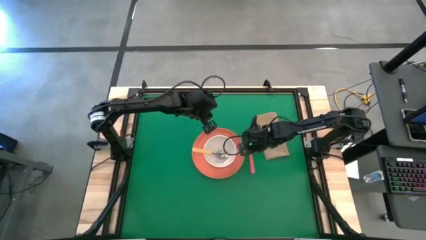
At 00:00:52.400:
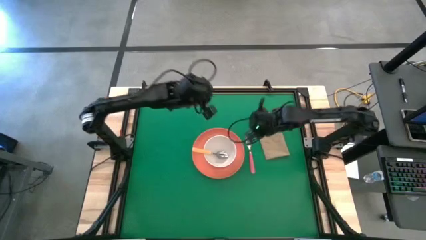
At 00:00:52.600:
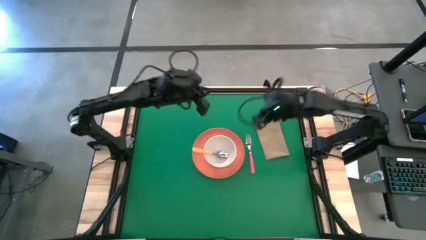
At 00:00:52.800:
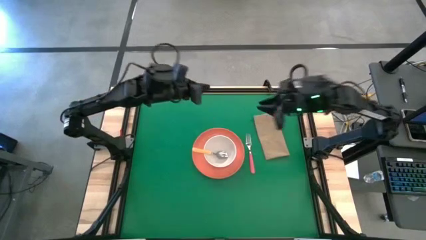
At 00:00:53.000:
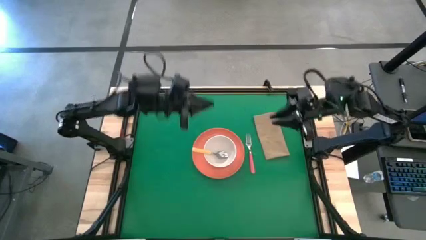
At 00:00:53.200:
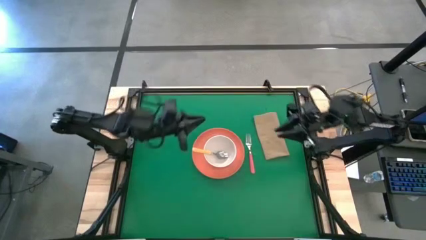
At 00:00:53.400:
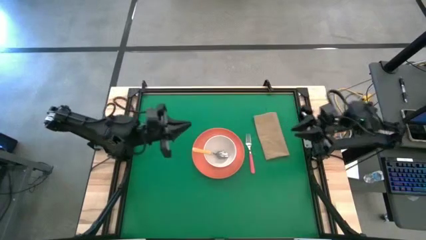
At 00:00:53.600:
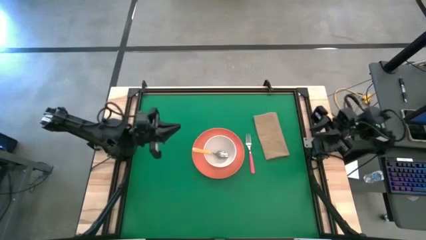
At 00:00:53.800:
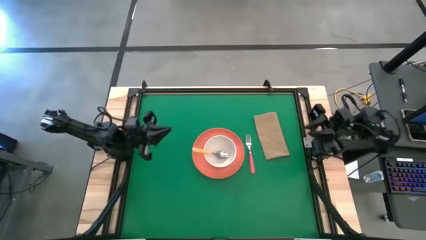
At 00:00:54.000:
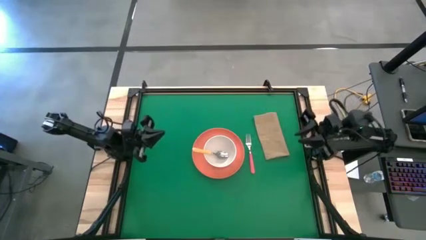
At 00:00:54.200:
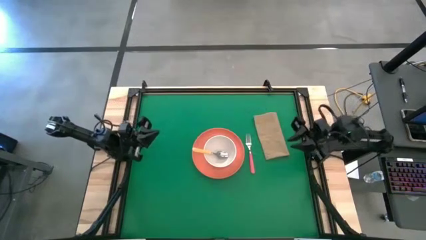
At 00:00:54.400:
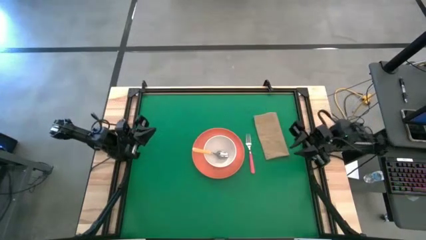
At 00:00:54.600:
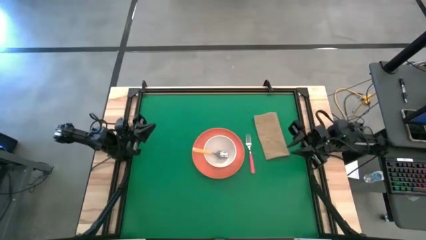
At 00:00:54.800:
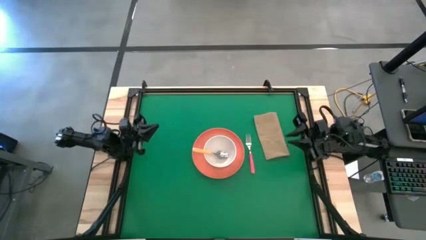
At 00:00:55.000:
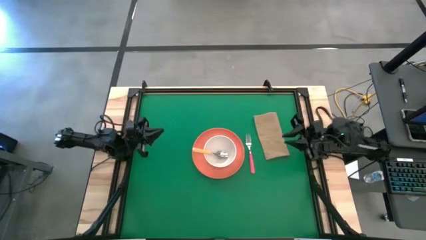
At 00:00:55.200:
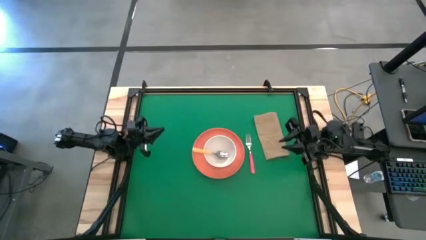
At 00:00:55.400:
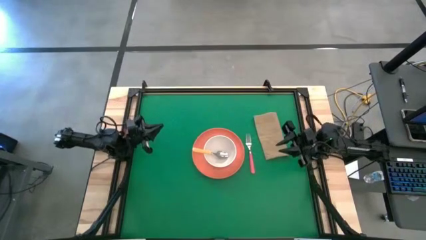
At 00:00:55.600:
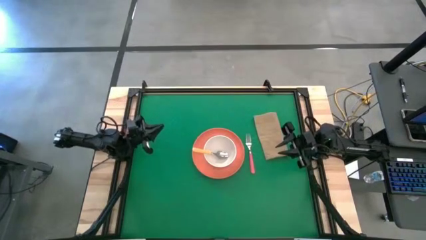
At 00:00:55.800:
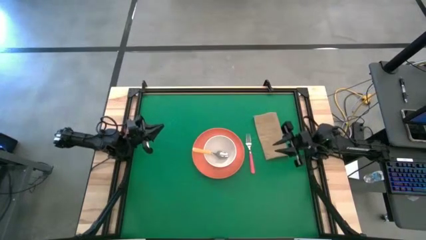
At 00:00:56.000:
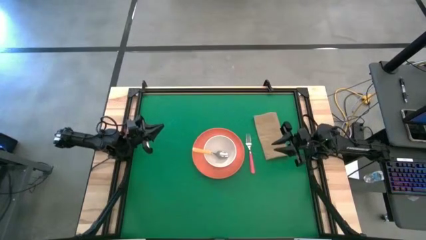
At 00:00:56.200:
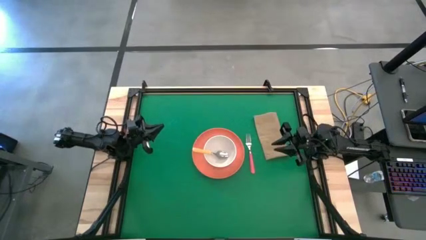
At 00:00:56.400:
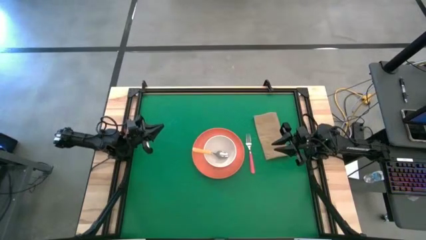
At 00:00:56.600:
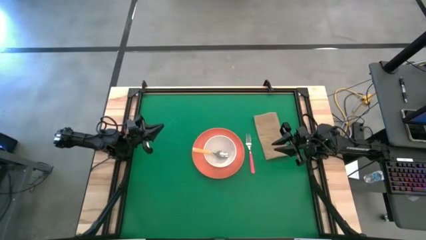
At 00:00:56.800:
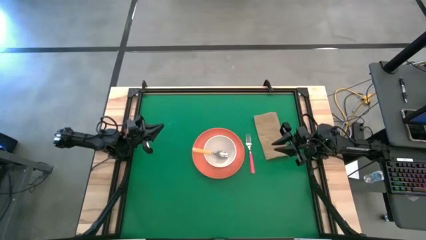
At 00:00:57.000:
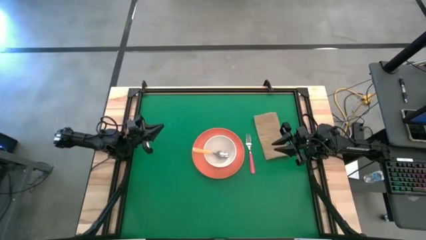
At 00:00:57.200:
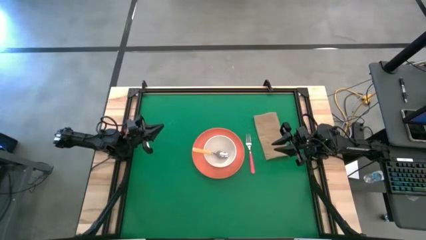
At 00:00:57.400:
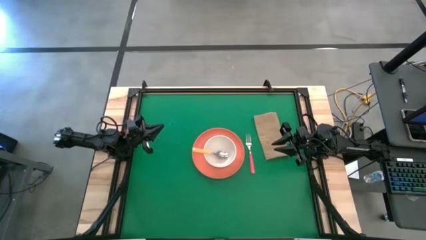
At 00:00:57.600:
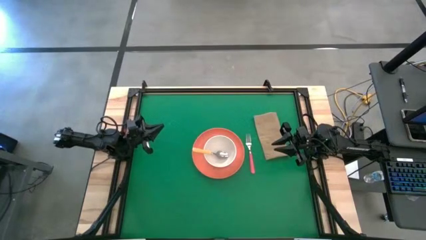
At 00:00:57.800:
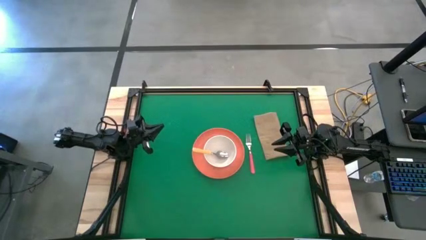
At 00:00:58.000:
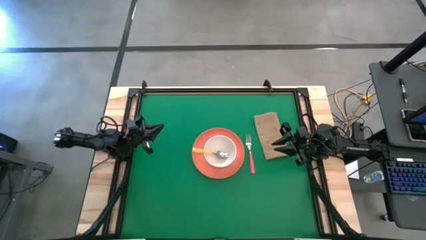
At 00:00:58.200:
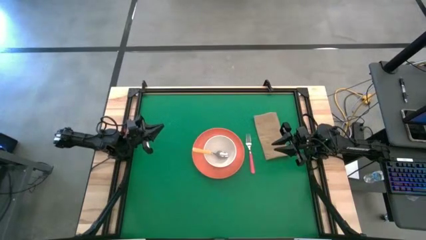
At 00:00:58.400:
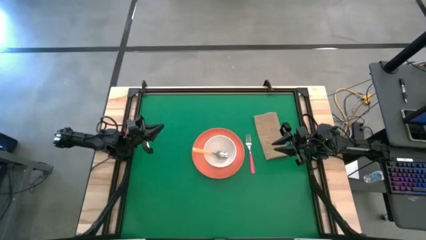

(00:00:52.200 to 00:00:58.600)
Task: Set table place
Return to Home Position

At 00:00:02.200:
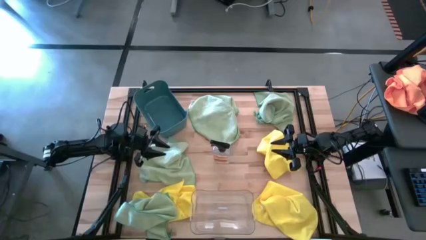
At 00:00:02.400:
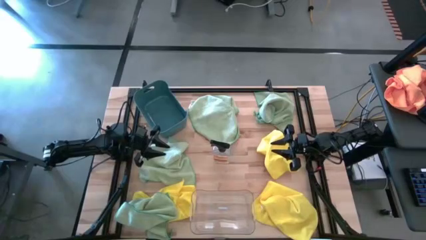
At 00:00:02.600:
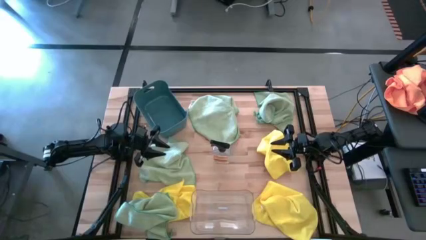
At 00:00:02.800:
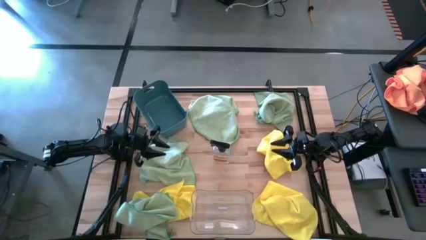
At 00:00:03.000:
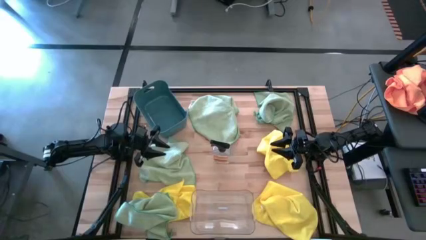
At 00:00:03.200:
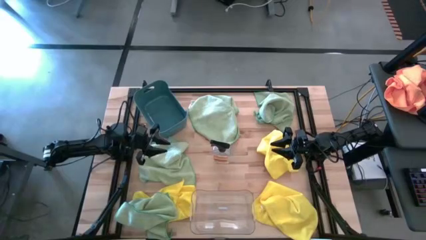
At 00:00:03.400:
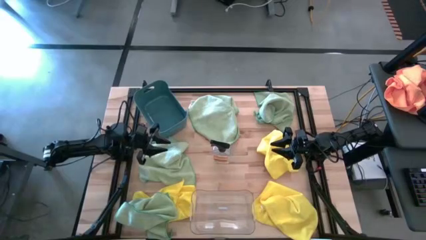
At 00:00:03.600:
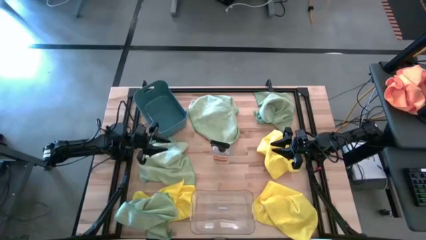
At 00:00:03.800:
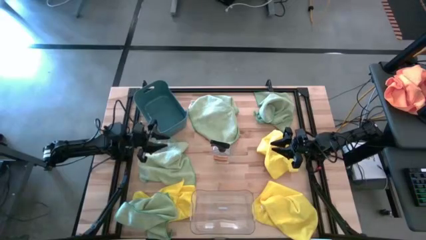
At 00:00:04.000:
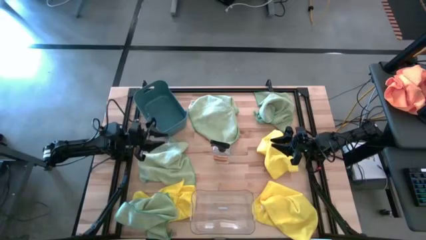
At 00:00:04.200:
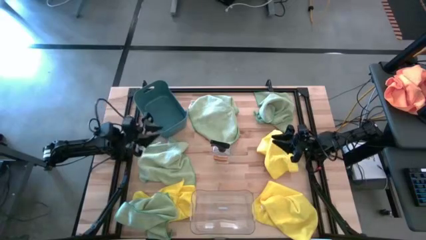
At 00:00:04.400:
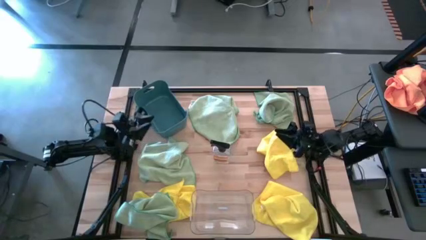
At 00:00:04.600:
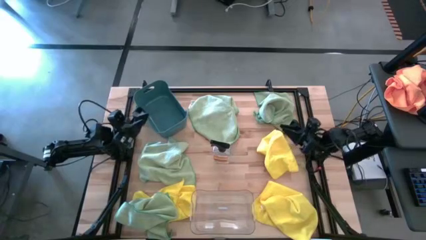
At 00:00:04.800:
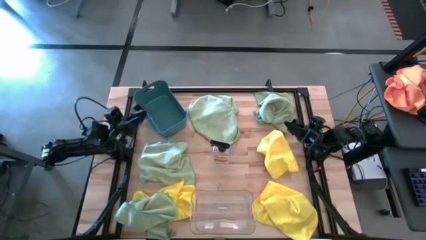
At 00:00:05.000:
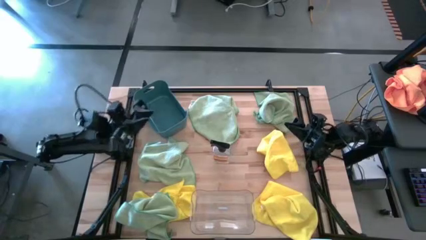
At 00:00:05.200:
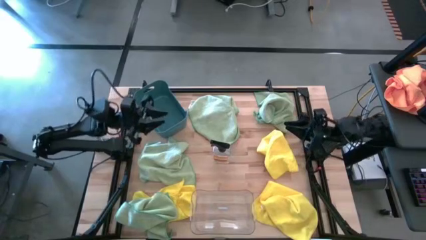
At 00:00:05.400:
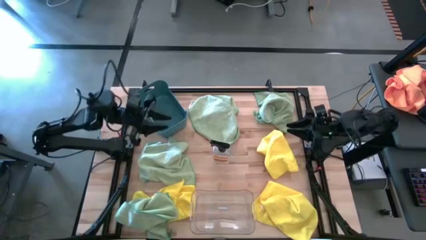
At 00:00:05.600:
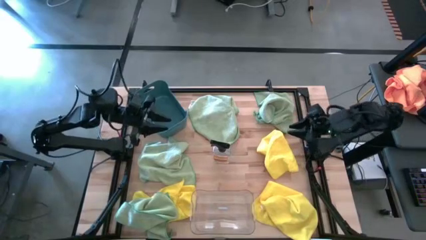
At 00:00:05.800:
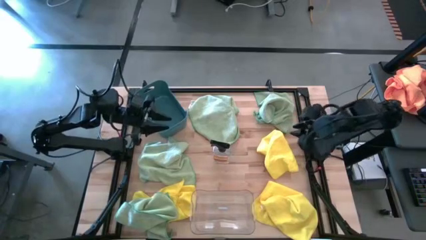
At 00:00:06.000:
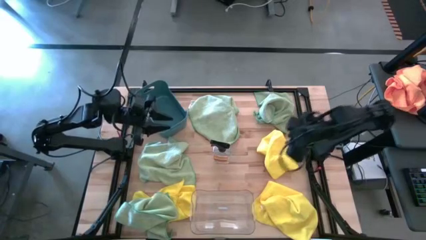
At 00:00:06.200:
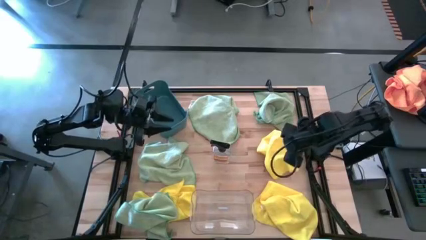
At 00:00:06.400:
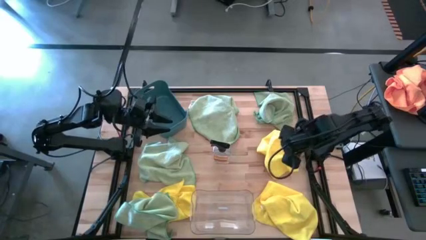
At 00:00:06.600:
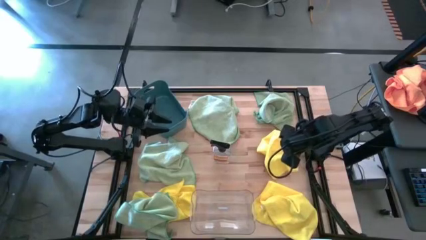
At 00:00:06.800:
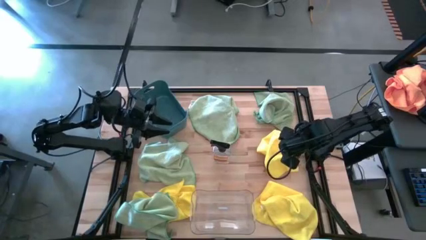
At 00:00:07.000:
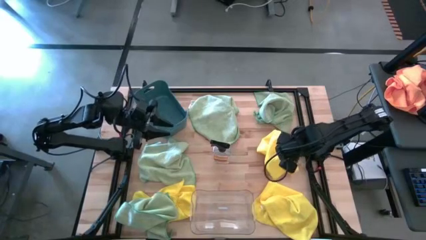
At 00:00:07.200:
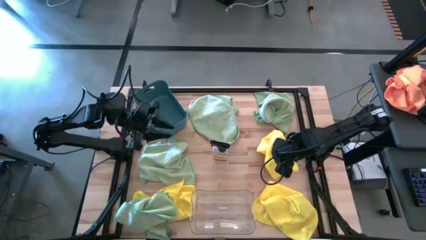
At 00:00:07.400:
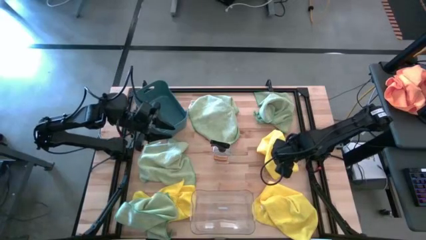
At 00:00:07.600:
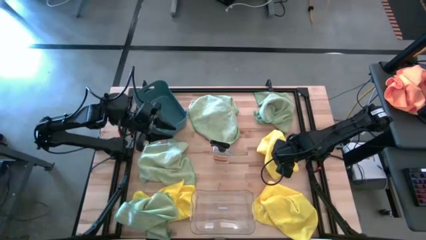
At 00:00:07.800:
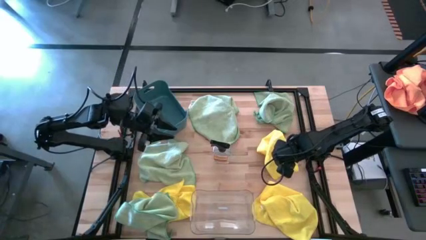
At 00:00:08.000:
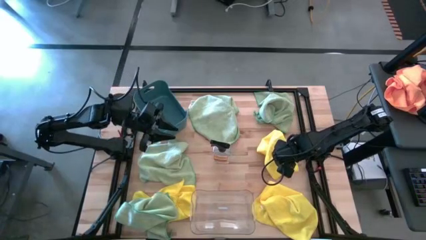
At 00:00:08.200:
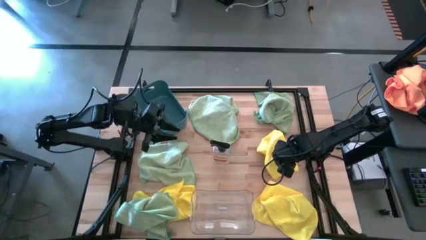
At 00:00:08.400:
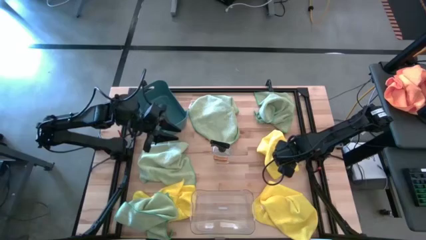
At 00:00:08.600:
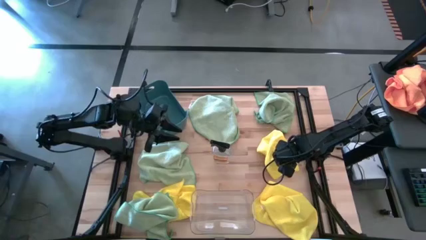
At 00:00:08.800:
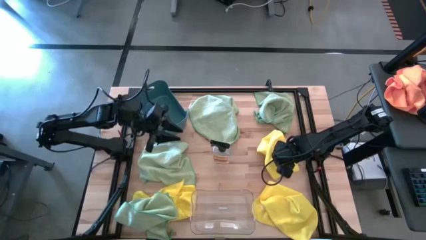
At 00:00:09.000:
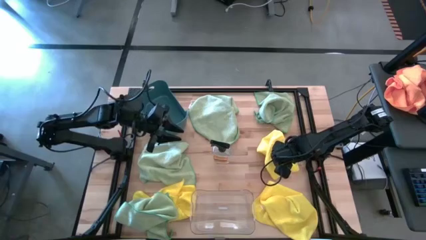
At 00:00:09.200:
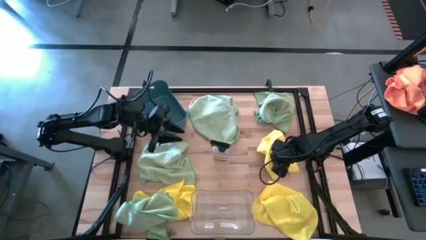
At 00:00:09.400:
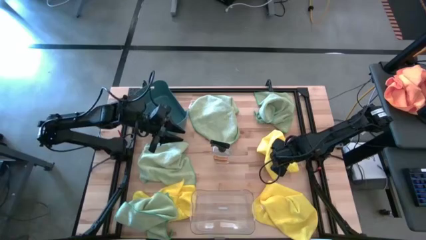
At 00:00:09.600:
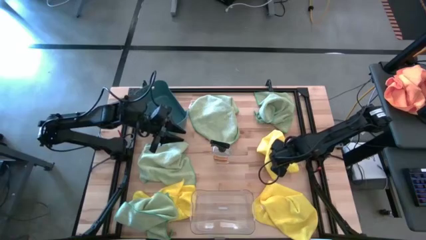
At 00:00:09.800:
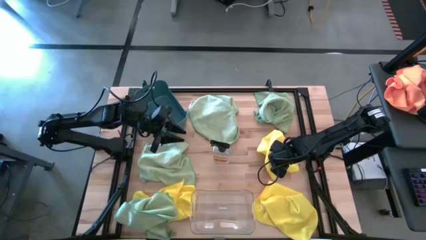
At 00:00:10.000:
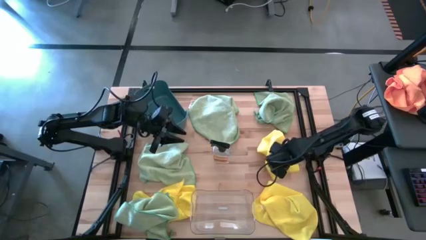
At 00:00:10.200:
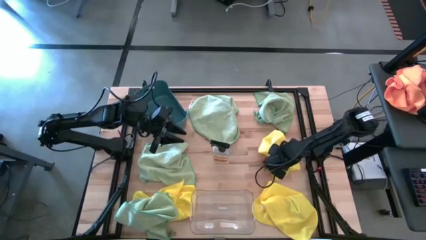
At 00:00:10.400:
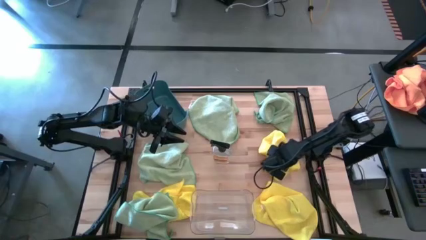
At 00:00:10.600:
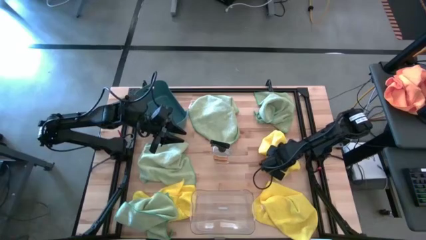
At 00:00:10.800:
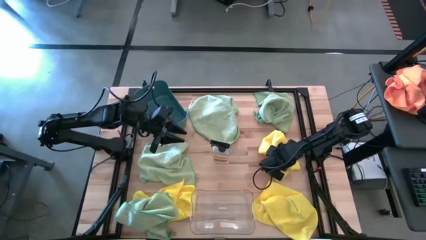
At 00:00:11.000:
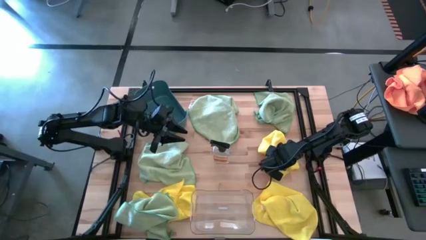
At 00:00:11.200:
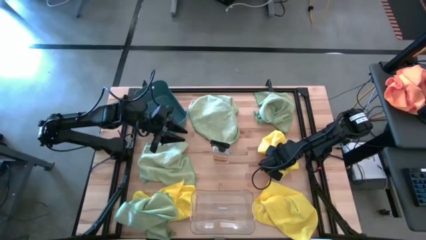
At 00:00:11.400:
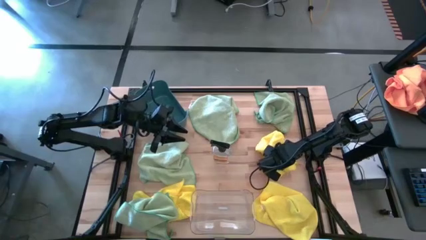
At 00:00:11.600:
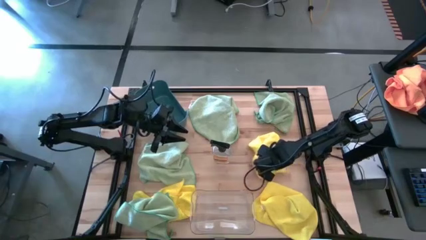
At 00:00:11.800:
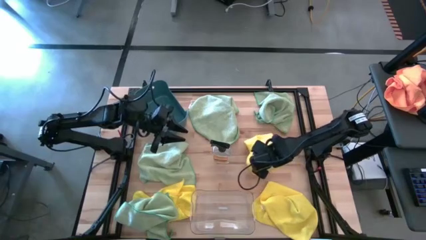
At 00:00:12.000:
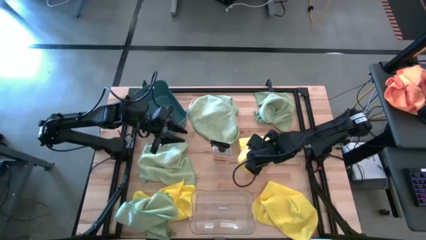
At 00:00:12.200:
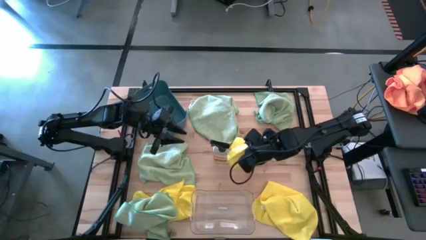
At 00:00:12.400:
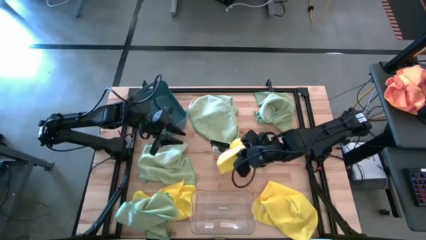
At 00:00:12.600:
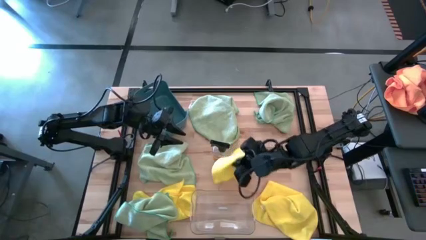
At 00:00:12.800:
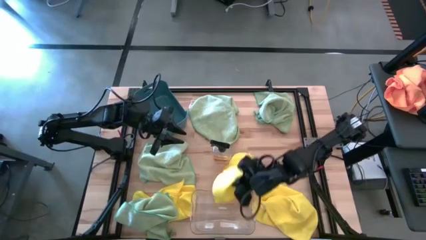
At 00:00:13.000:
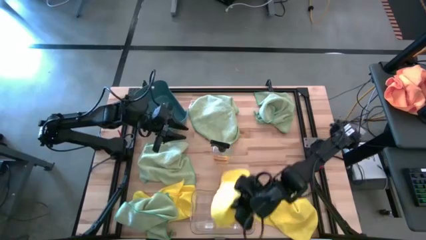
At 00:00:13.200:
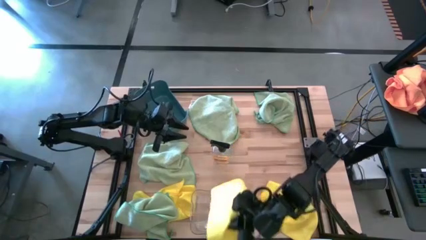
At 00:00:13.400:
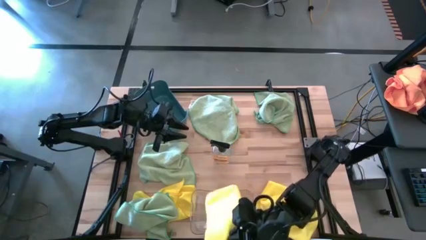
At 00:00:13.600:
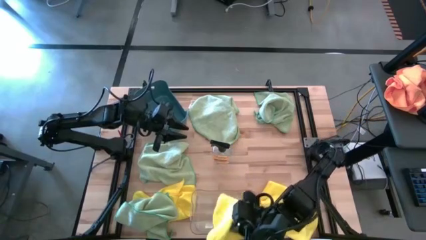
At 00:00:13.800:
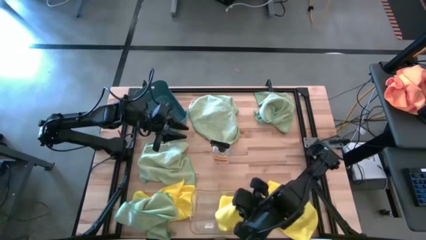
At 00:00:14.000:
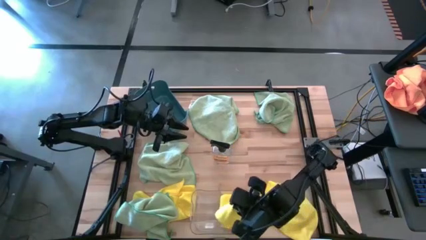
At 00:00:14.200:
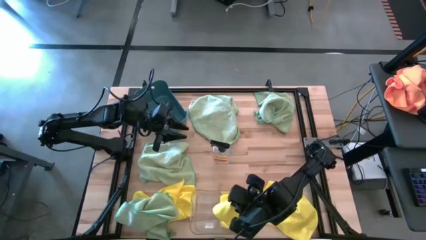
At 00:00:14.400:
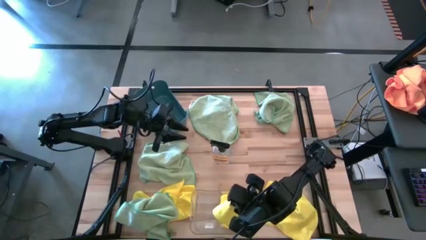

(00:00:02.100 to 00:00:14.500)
Task: Sort microfiber towel by color & place in baskets
Put the yellow towel into the transparent bin
